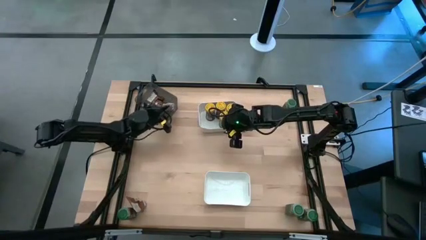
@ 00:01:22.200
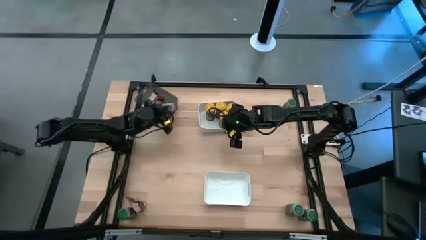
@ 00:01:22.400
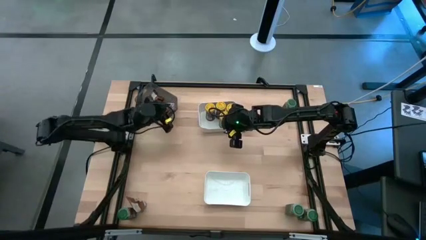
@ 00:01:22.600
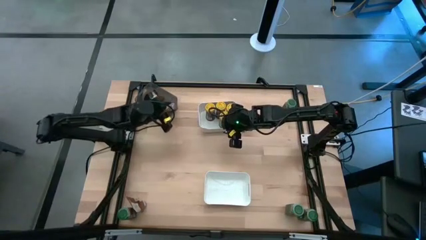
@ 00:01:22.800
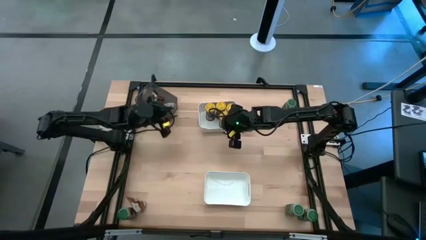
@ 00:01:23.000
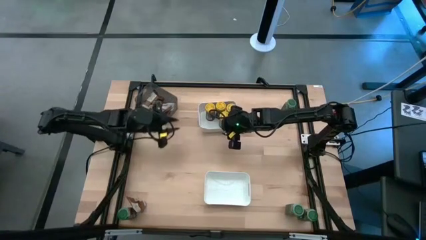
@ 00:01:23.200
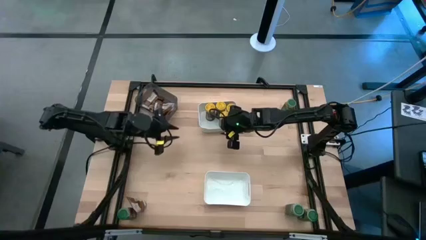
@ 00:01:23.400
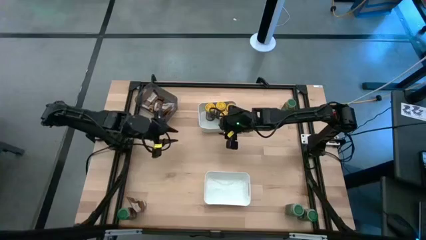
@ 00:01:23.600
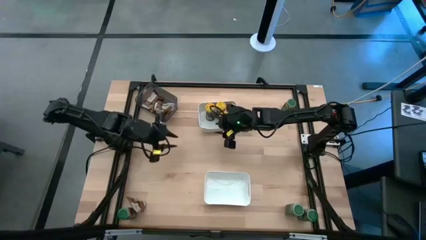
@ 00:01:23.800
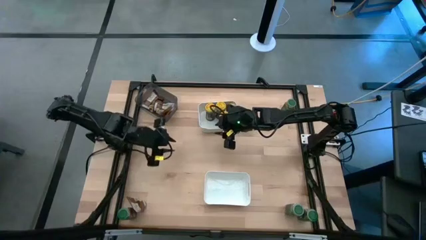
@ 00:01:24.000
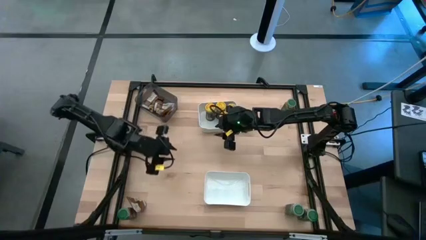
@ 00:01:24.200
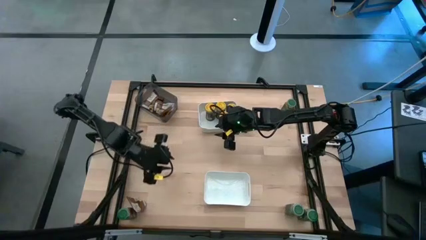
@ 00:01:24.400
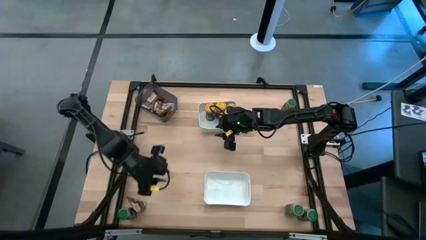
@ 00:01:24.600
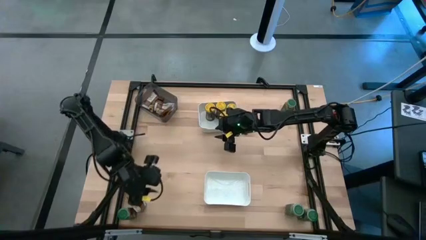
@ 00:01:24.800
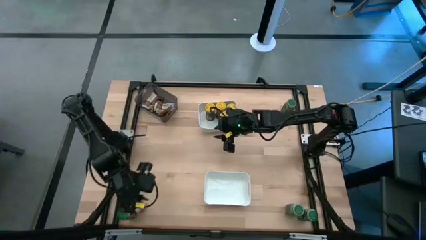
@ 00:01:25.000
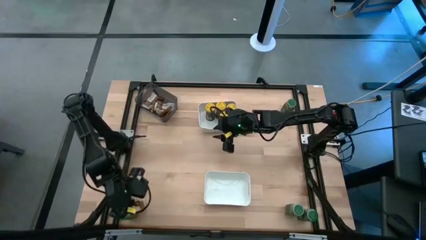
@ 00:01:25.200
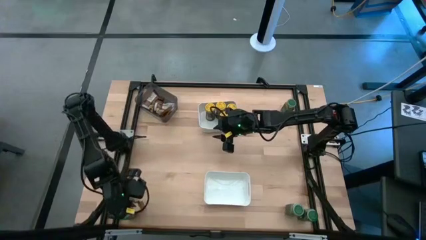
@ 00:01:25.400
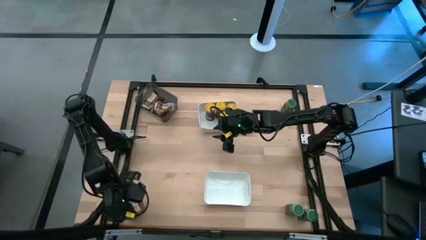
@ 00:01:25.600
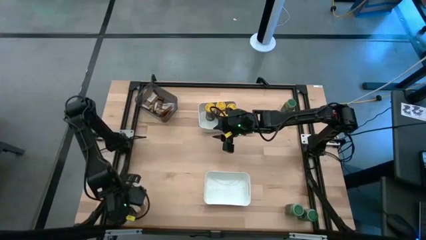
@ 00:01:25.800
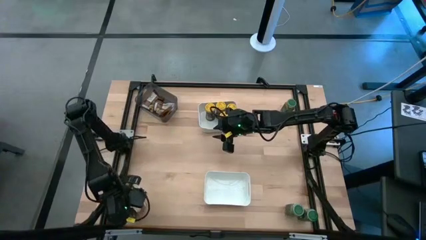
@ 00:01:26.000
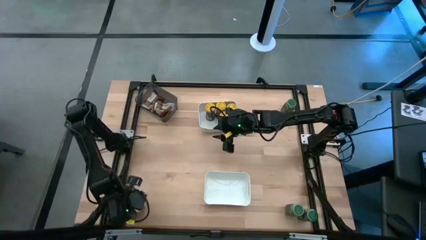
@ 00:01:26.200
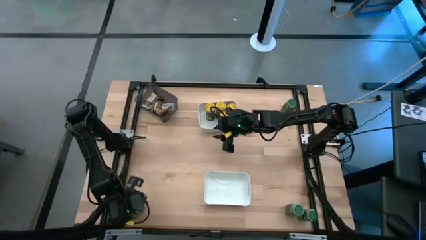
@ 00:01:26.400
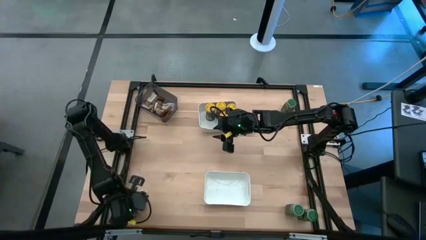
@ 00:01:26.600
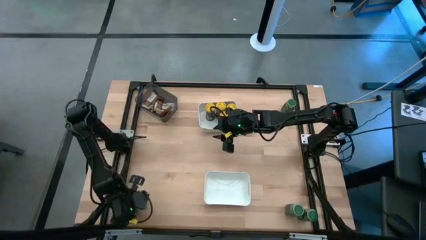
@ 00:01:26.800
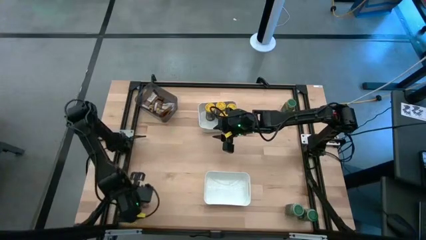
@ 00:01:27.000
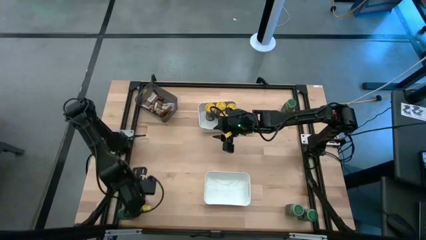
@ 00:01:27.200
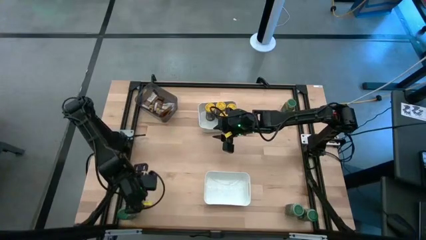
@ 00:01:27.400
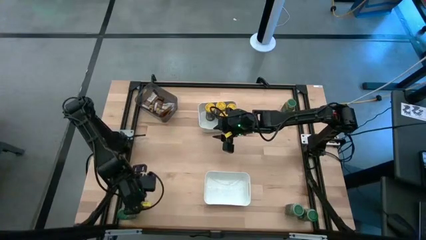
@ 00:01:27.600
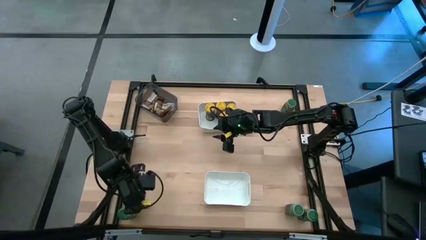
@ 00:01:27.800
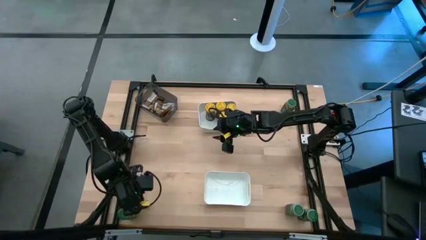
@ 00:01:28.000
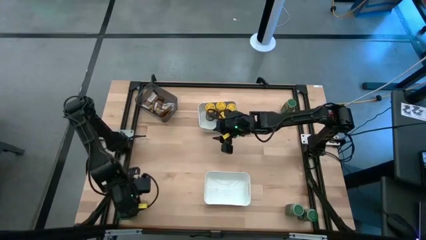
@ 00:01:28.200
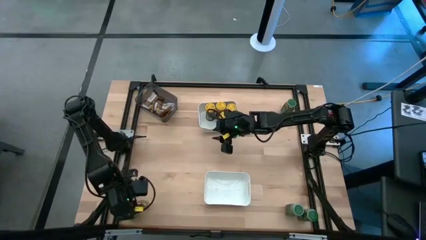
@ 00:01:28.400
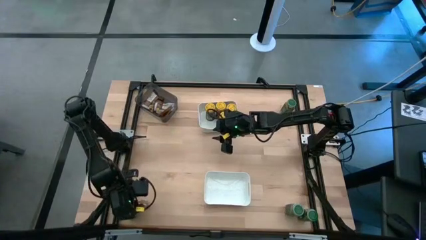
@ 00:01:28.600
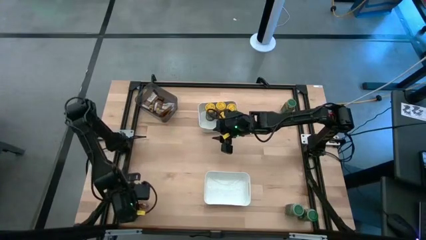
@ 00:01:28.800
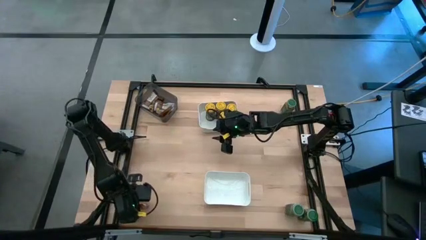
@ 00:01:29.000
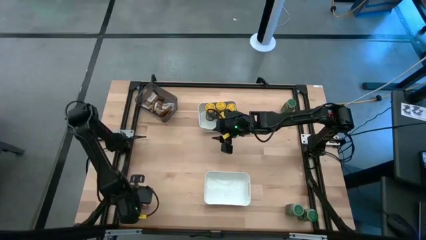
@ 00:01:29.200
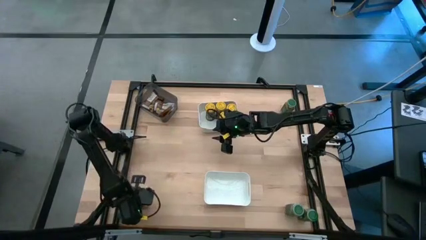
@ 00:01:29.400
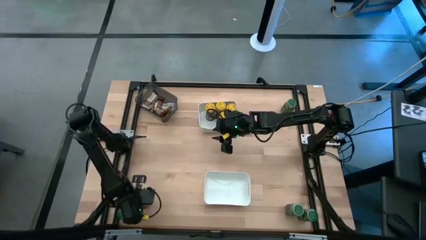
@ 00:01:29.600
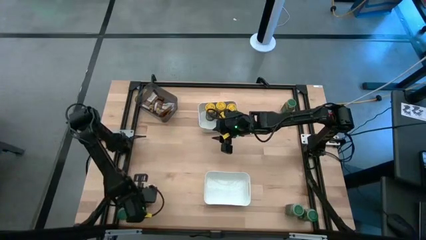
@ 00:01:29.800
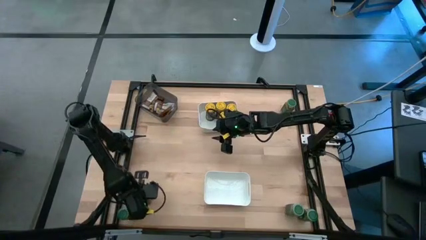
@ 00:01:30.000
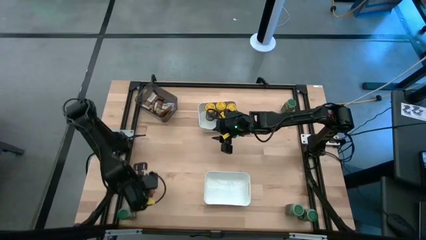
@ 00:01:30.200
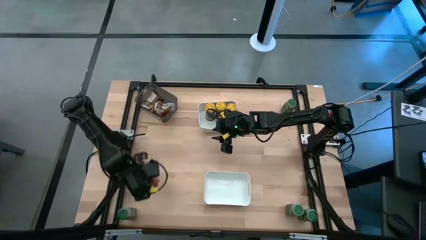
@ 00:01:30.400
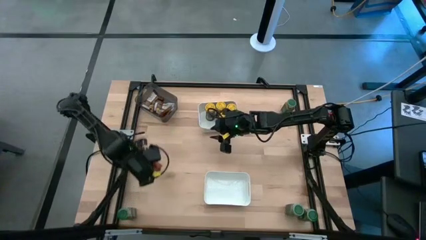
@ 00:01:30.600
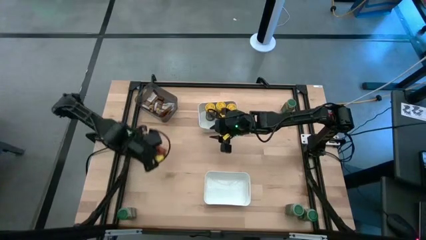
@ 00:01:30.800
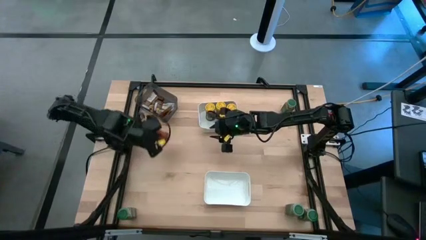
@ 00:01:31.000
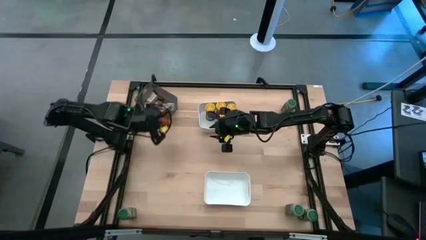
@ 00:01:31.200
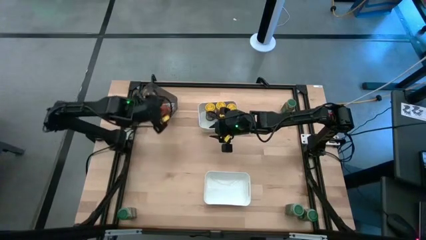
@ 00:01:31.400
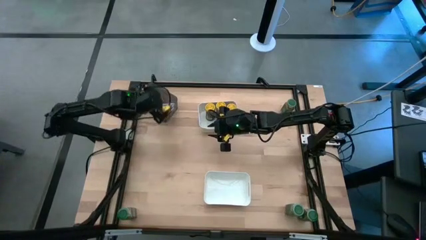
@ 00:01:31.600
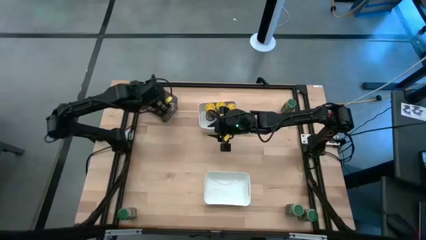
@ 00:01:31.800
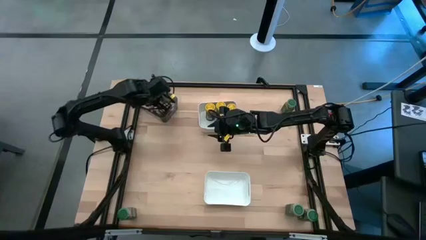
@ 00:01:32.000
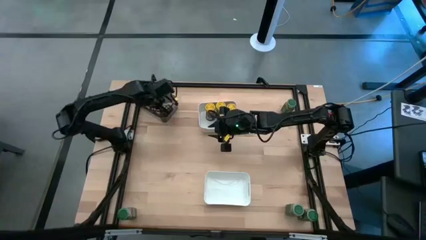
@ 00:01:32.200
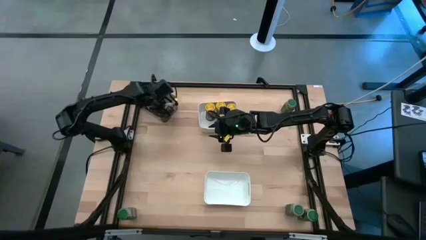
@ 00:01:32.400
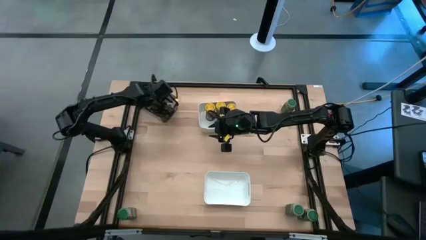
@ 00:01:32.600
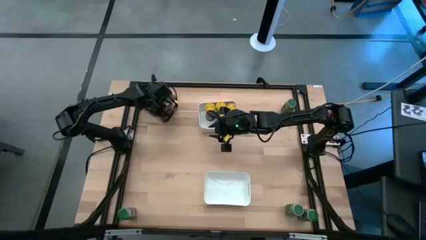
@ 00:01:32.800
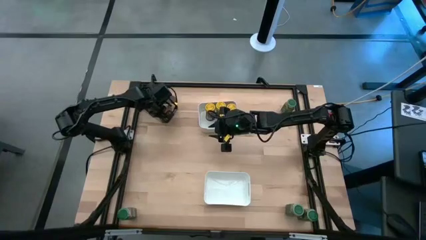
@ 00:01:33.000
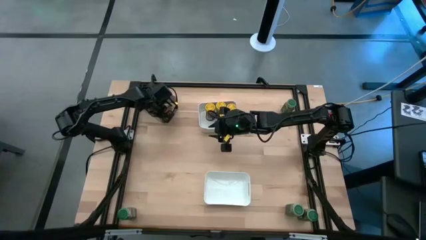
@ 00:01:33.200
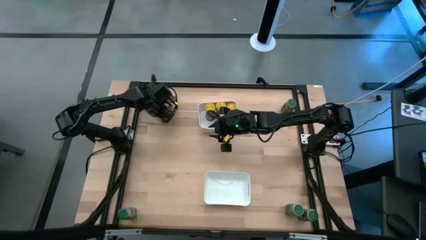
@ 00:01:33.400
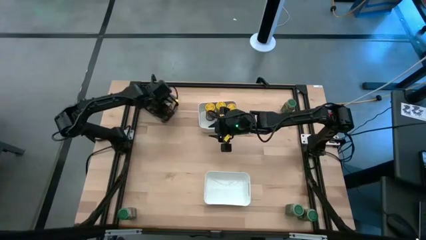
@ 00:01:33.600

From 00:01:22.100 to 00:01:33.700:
Task: Sort spices by type
Put the orange seasoning pack into the black bin

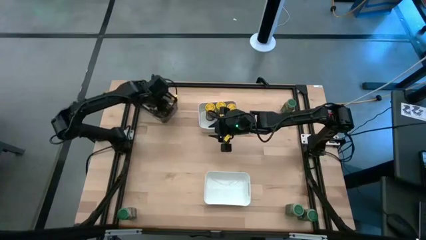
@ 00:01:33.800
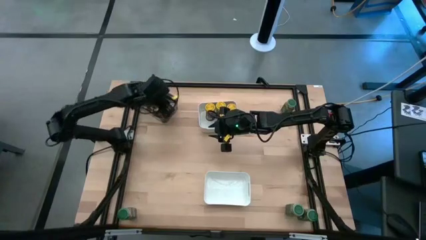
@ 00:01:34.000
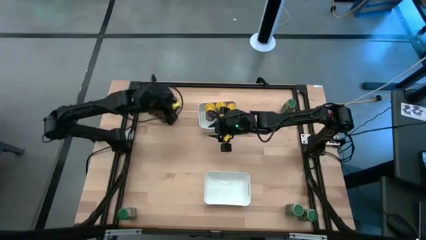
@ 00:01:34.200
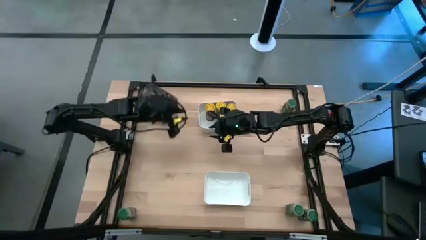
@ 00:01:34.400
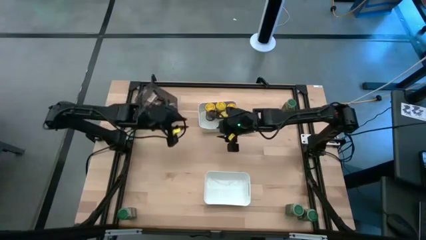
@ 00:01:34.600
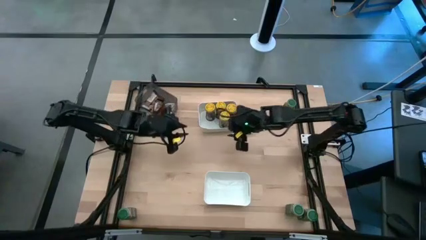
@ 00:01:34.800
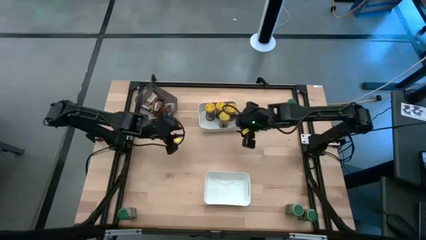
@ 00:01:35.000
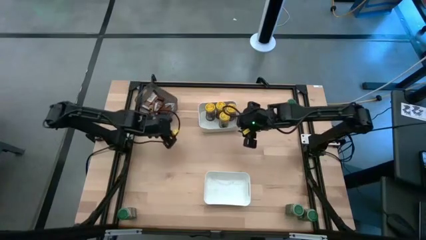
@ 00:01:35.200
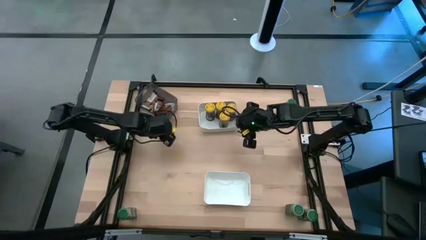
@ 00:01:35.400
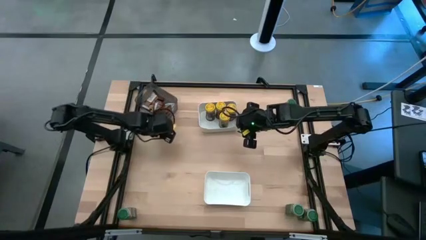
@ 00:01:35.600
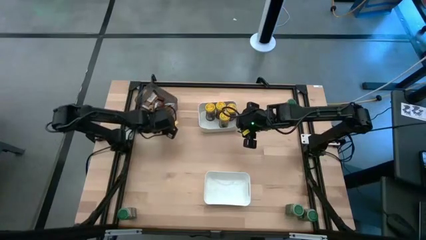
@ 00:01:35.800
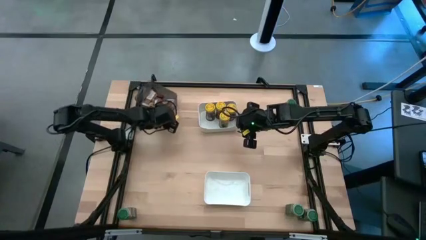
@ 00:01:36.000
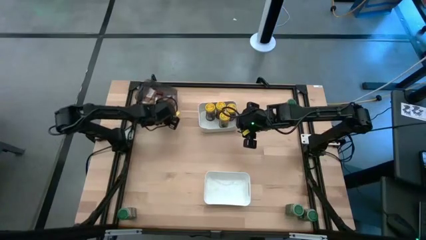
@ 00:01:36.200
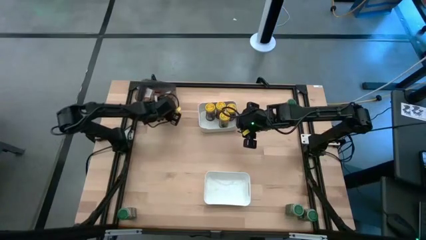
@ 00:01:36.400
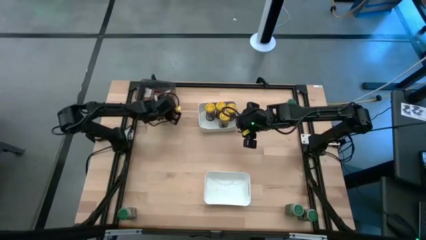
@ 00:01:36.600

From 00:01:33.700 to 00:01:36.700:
Adjust the black bin
